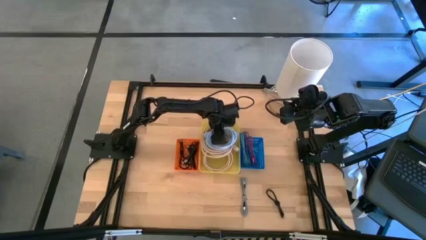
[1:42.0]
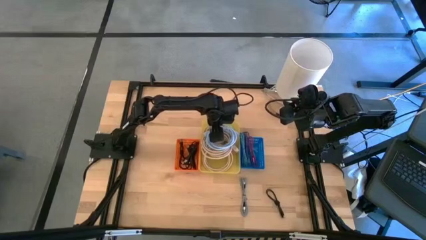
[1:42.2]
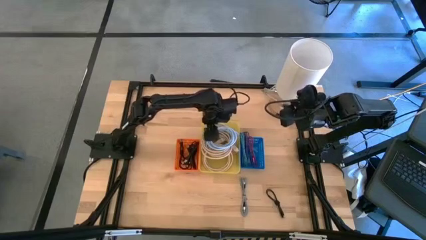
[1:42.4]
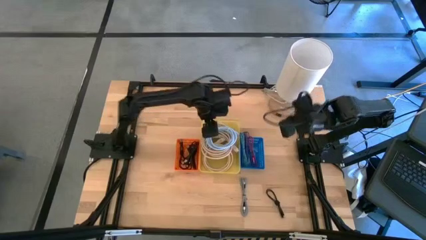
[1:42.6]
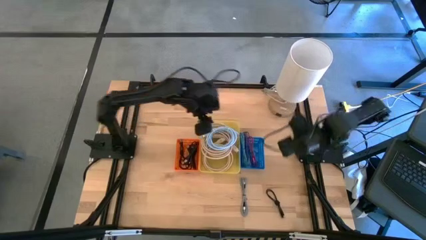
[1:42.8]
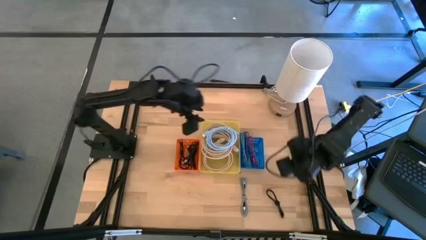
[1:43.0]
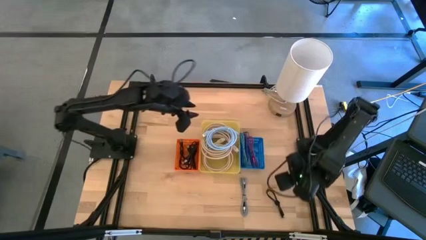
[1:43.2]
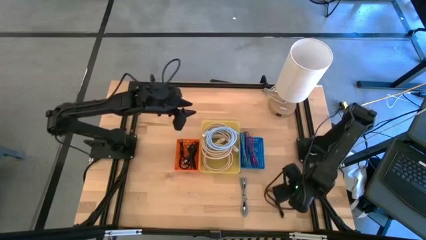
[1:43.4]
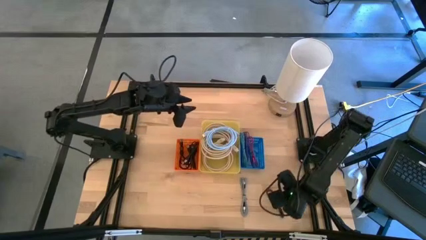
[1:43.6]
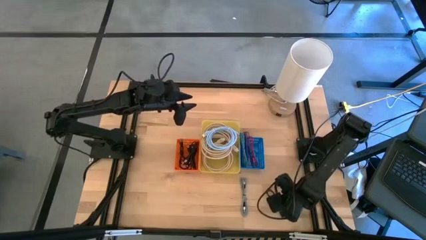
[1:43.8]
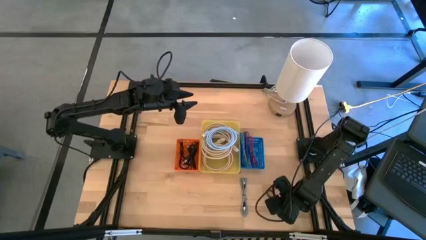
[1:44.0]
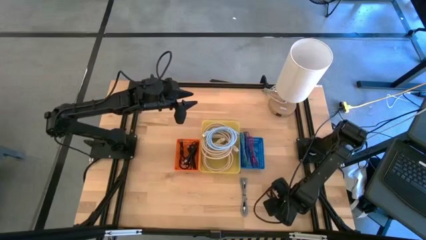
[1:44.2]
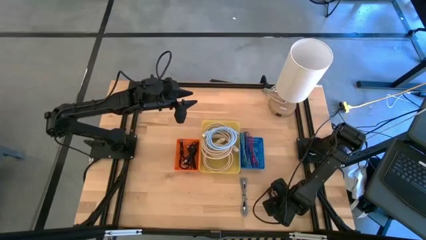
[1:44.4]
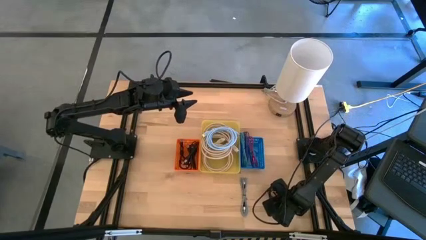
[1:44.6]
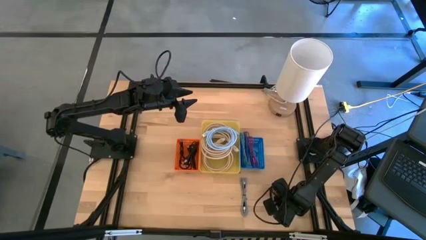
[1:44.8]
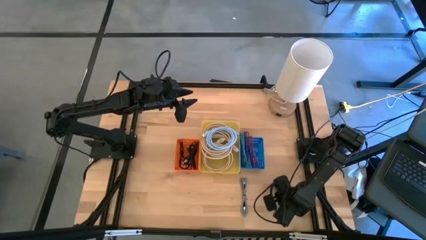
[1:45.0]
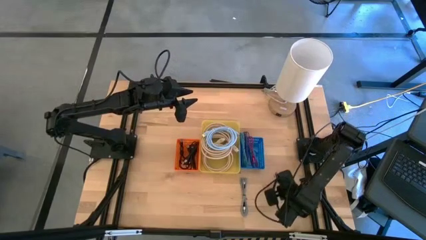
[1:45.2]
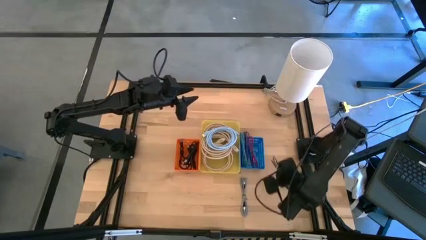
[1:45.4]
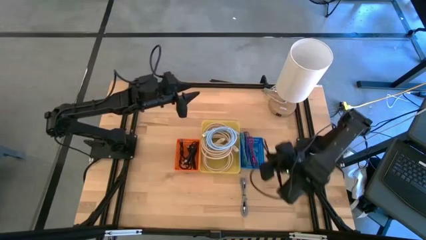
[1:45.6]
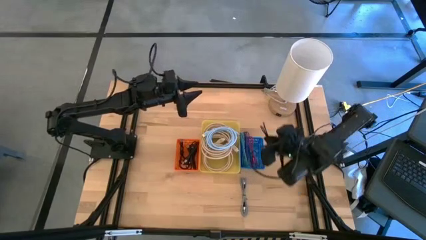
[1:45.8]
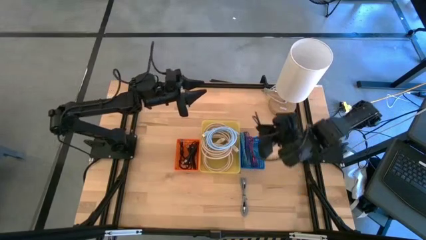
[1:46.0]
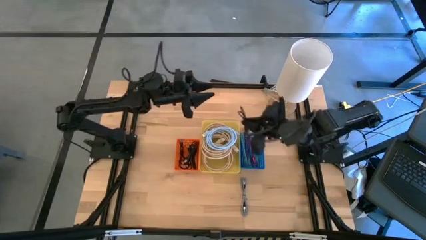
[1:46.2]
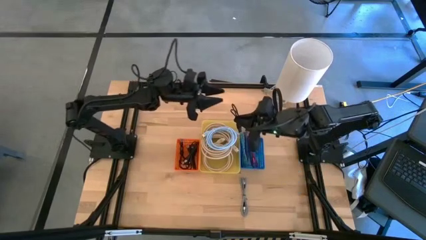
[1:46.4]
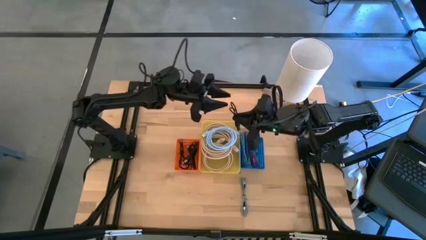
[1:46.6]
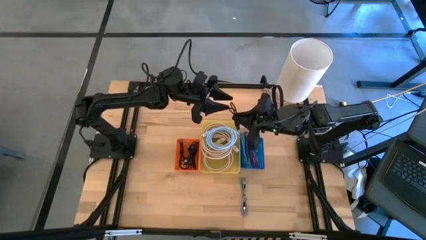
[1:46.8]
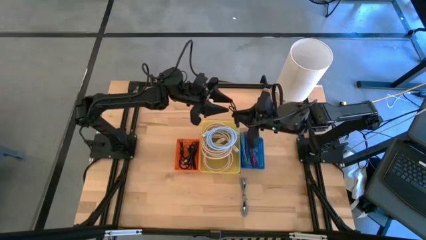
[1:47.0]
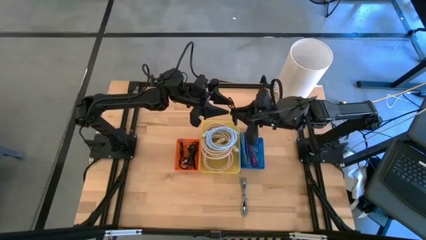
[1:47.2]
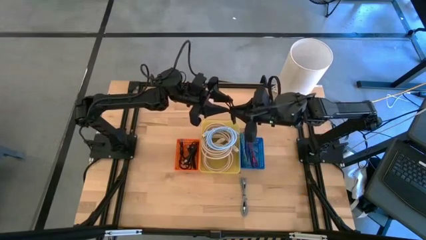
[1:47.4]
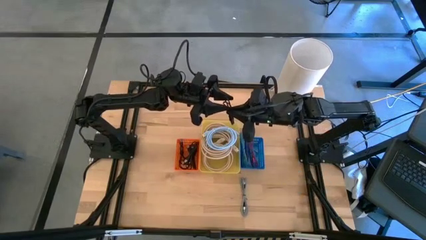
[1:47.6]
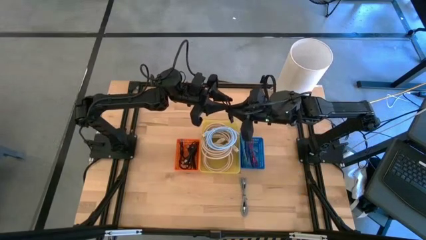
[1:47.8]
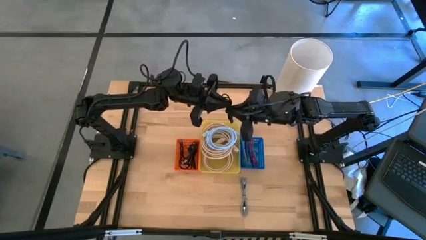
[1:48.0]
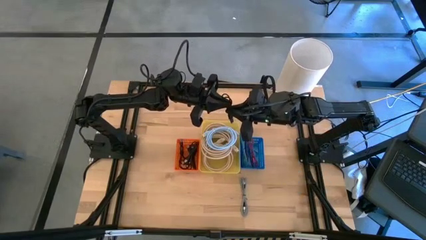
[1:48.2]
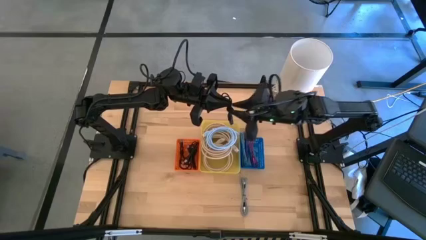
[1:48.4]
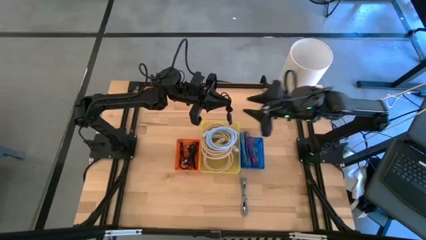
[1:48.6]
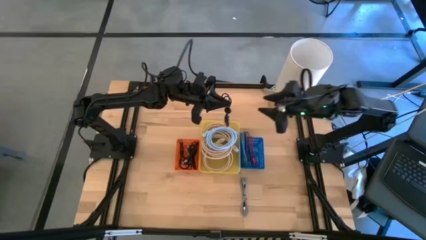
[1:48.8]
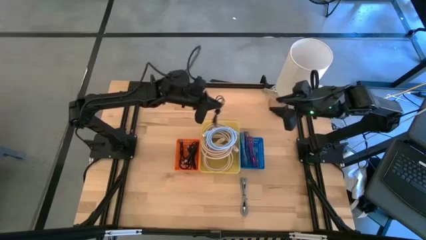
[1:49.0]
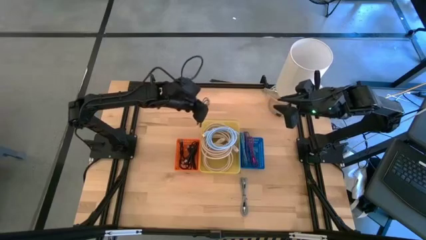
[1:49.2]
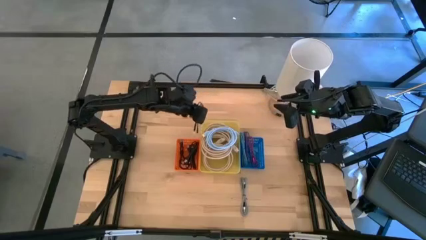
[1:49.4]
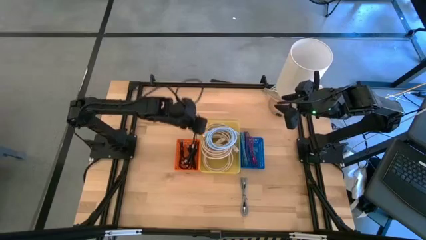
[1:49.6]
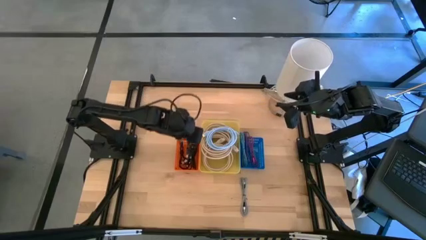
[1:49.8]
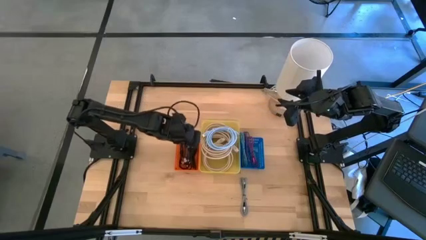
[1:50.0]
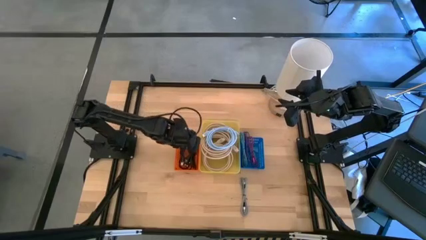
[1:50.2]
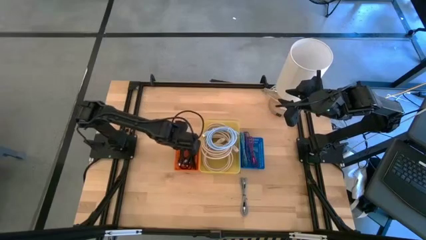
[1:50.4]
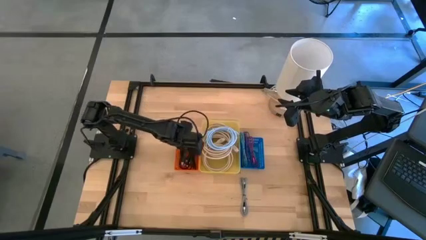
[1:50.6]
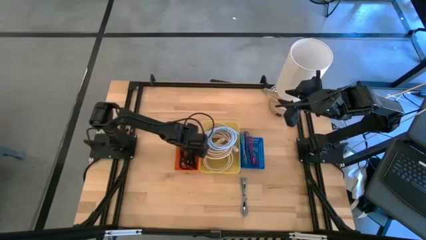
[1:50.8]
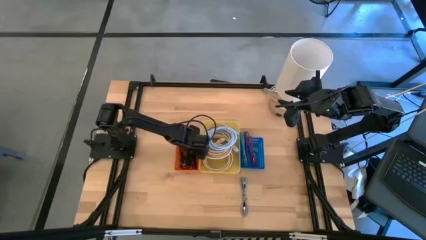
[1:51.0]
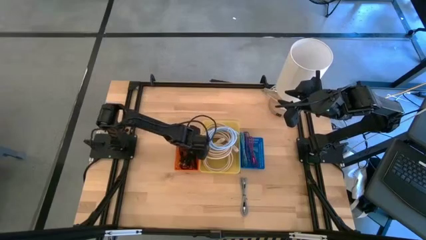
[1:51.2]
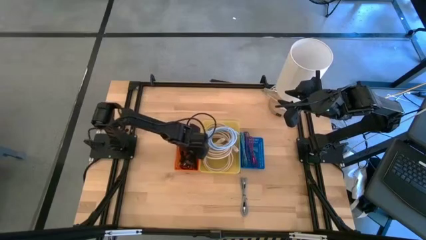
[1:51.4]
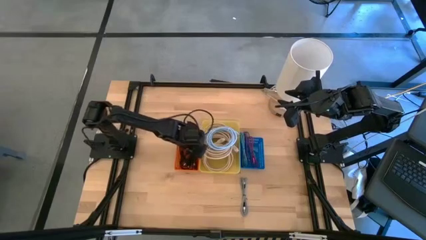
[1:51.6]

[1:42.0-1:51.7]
Task: Pick & Place USB Port
Put the black usb cable into the orange bin

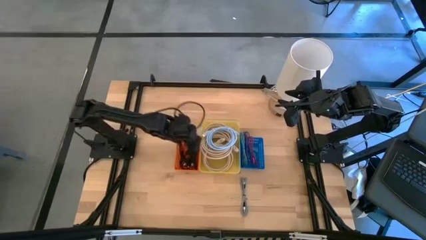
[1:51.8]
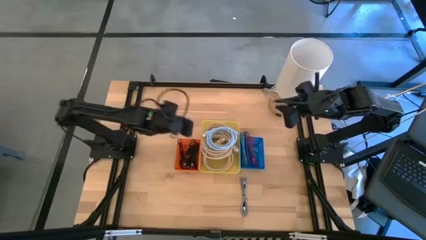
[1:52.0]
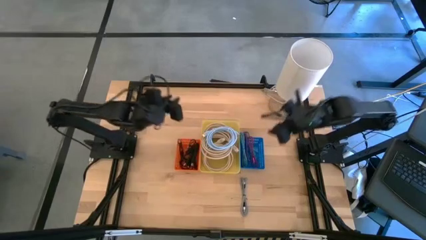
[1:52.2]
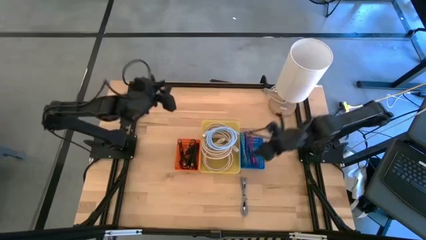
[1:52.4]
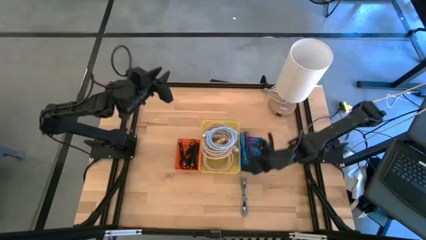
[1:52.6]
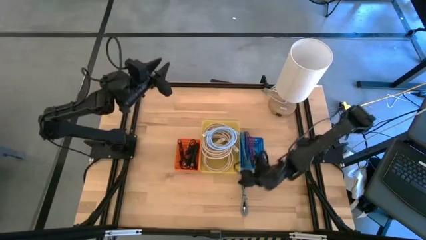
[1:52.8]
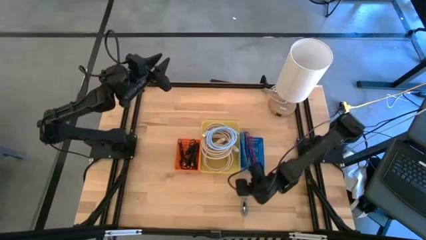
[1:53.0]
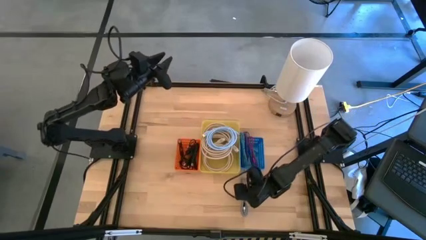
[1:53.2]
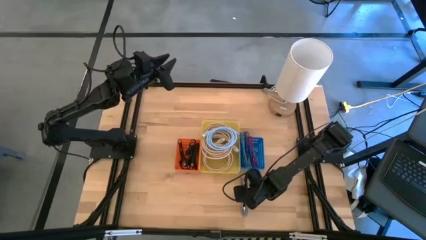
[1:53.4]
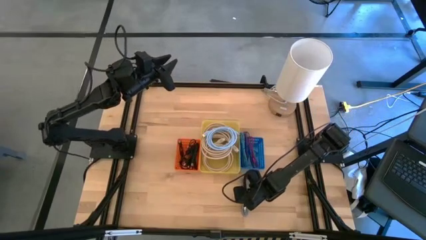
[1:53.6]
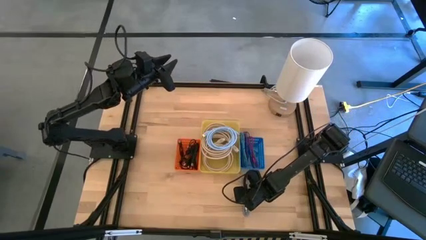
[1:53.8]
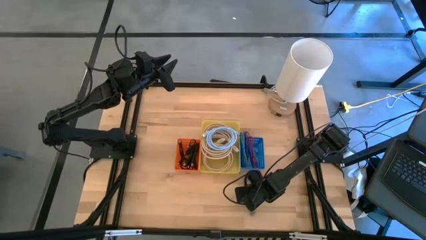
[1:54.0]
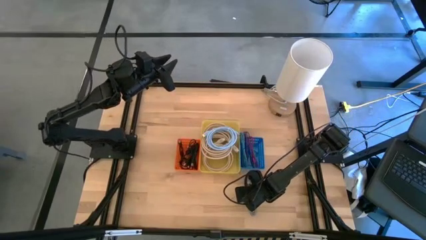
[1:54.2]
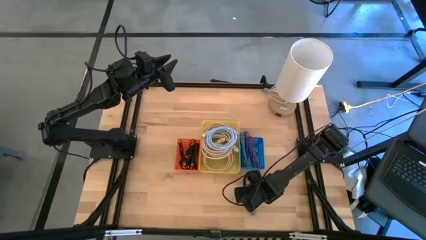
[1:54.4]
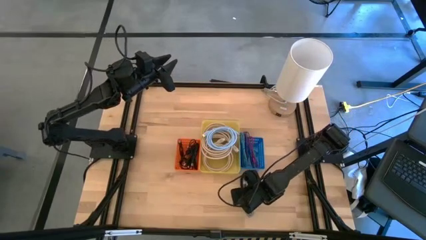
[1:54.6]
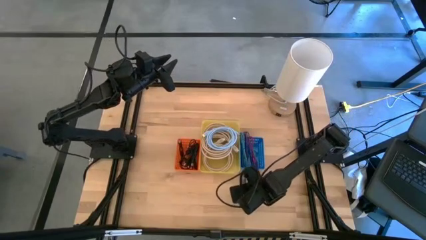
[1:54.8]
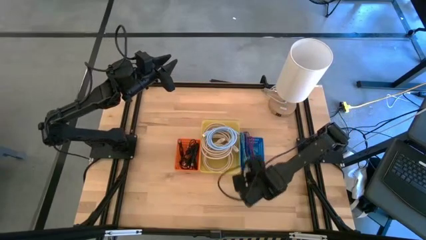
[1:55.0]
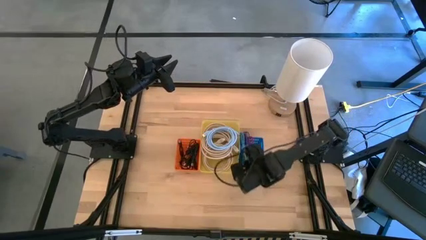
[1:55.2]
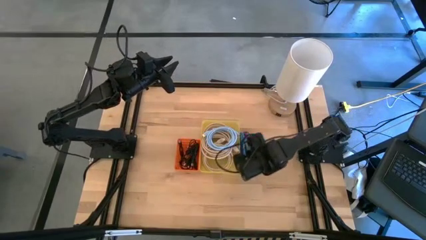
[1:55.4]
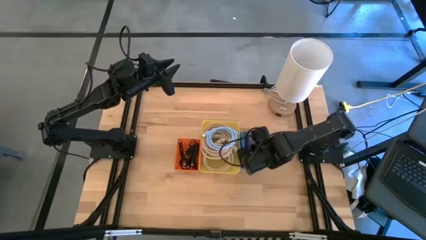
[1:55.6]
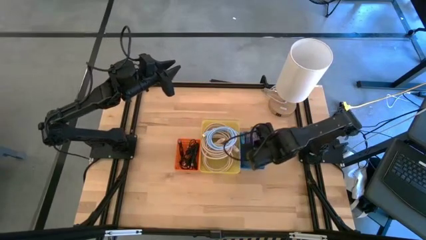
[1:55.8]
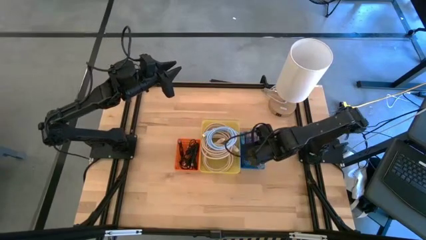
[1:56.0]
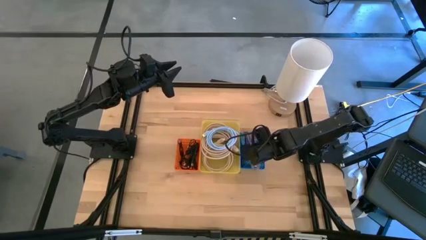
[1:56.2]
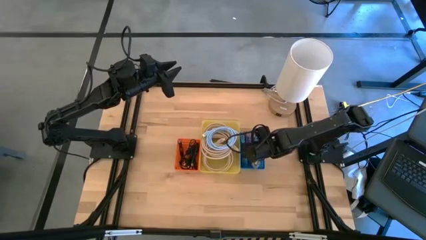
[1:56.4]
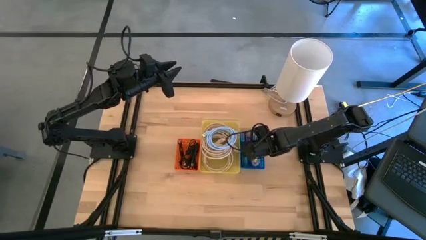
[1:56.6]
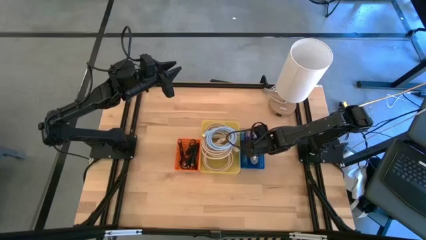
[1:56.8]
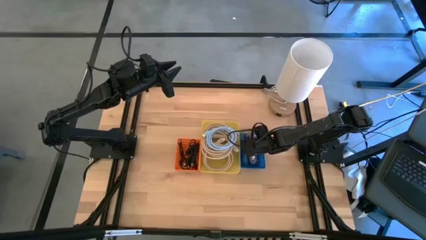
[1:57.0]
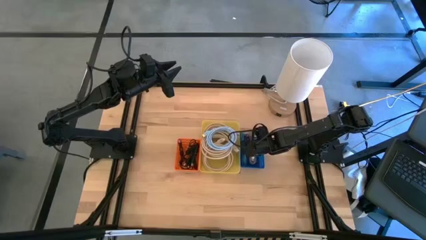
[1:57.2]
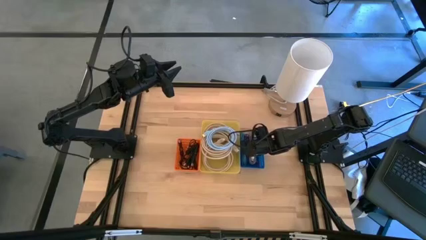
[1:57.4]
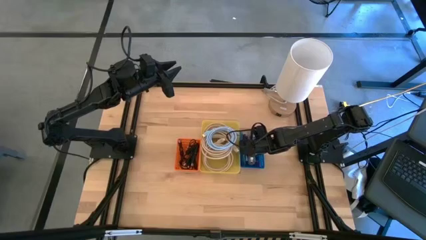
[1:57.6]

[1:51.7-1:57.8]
Put the gray patterned usb cable into the blue bin
